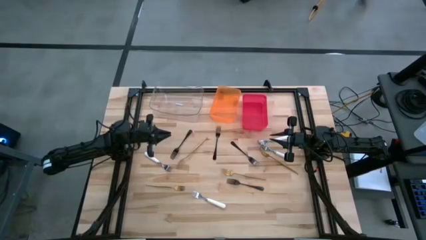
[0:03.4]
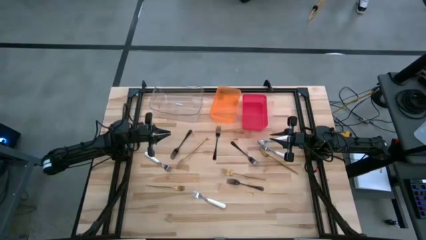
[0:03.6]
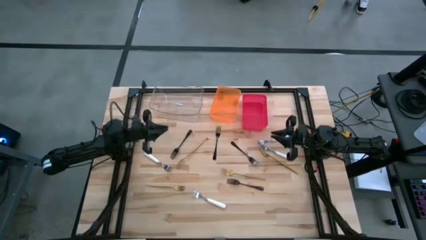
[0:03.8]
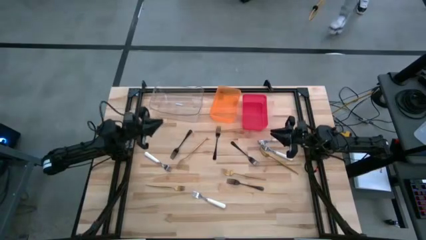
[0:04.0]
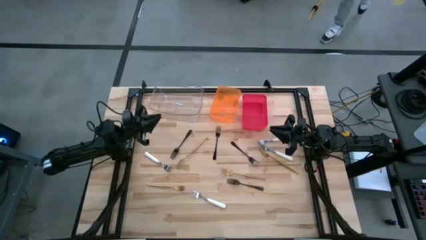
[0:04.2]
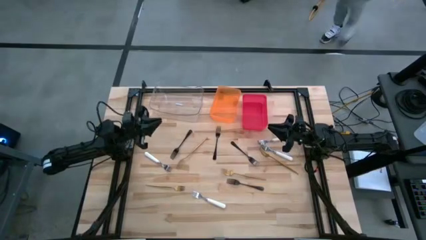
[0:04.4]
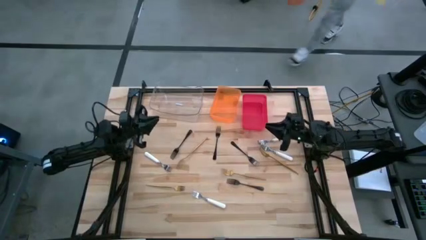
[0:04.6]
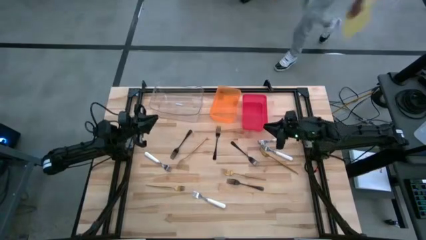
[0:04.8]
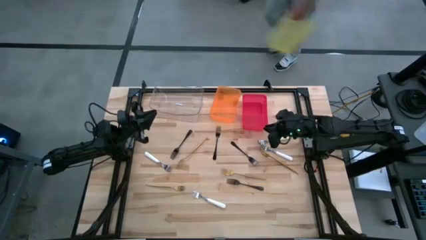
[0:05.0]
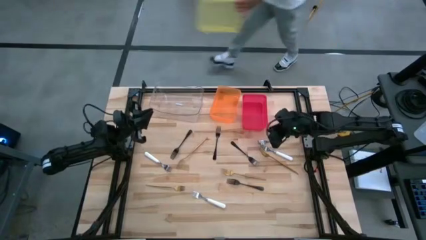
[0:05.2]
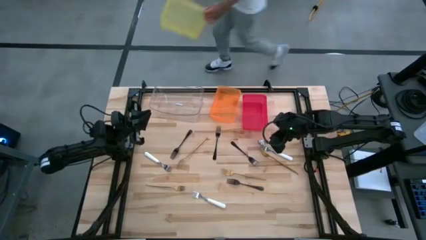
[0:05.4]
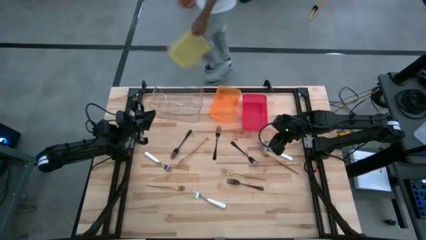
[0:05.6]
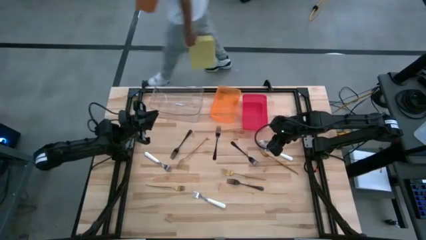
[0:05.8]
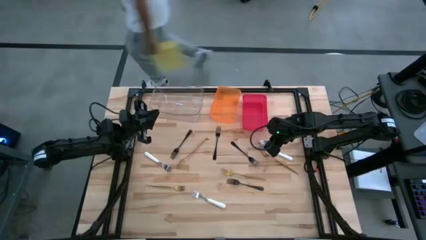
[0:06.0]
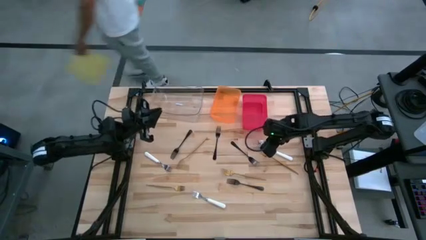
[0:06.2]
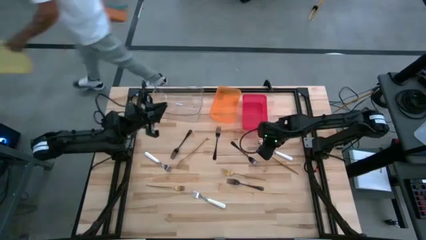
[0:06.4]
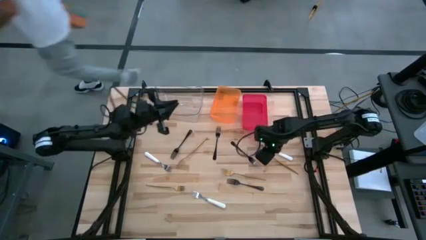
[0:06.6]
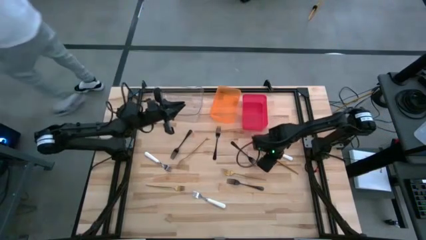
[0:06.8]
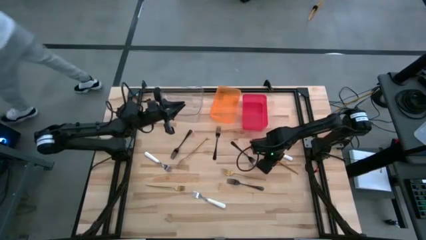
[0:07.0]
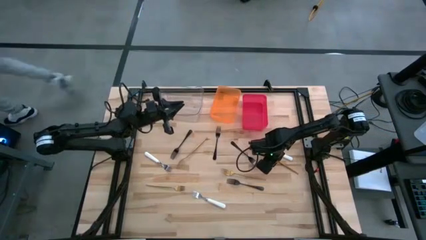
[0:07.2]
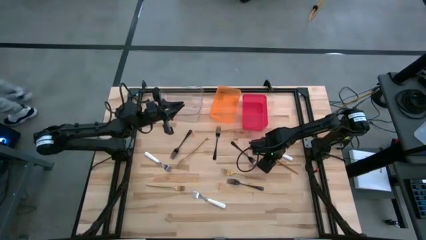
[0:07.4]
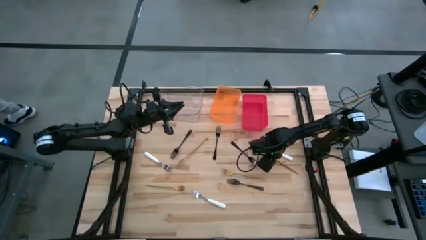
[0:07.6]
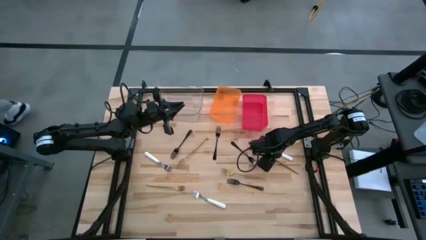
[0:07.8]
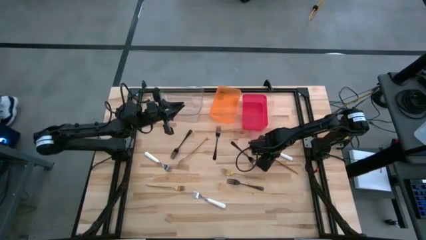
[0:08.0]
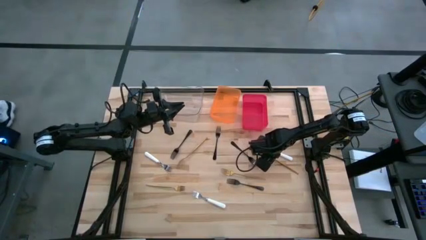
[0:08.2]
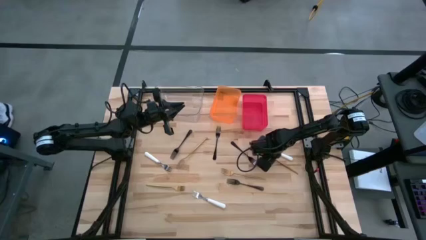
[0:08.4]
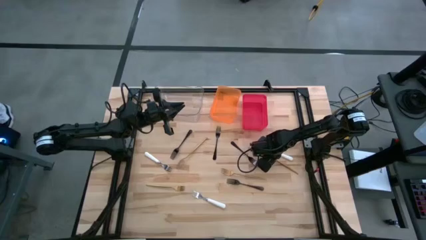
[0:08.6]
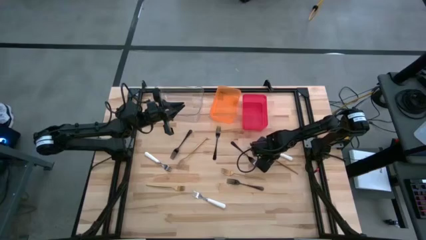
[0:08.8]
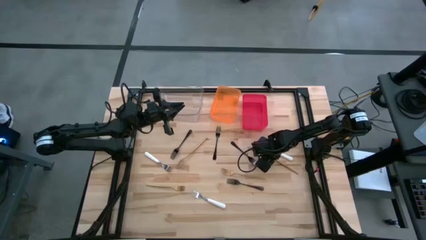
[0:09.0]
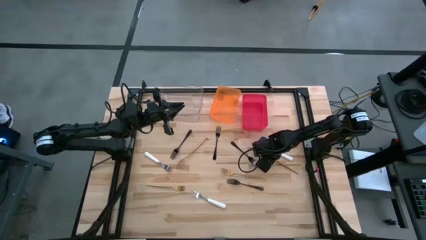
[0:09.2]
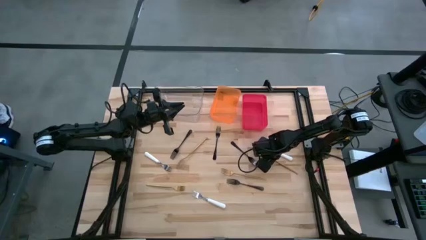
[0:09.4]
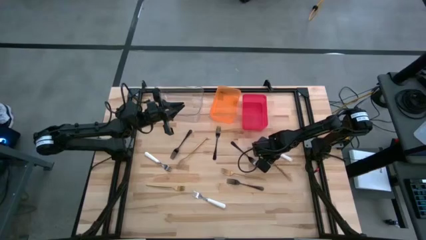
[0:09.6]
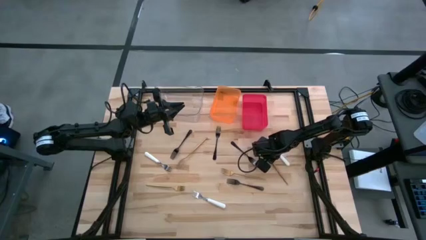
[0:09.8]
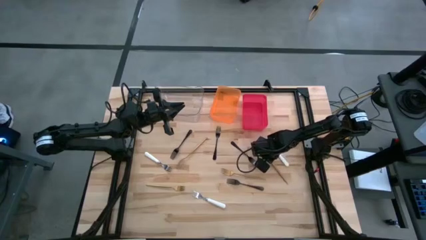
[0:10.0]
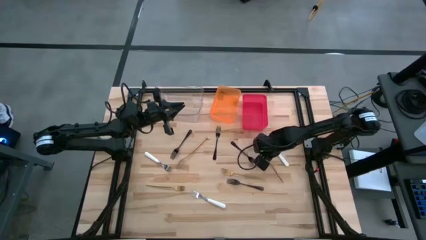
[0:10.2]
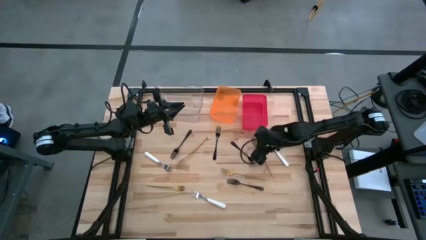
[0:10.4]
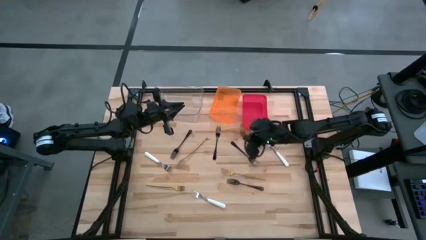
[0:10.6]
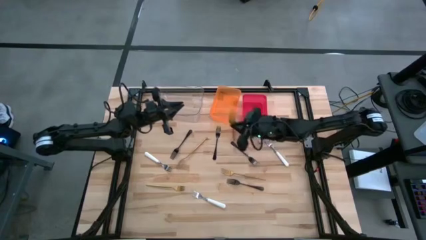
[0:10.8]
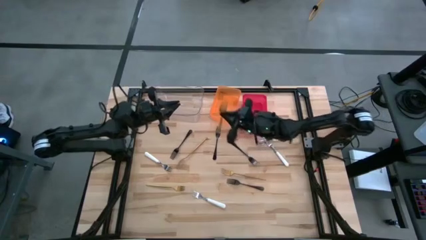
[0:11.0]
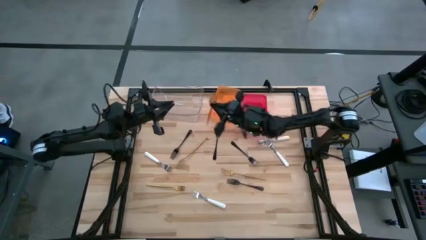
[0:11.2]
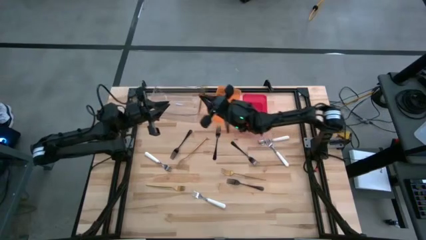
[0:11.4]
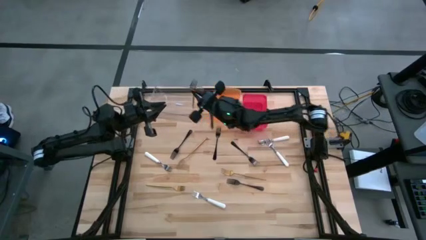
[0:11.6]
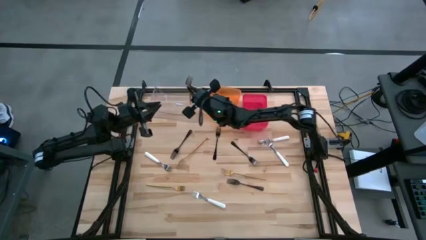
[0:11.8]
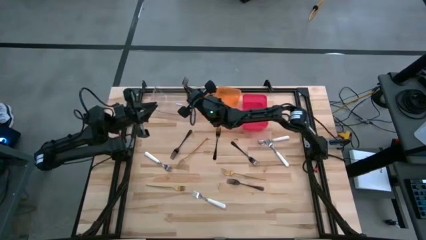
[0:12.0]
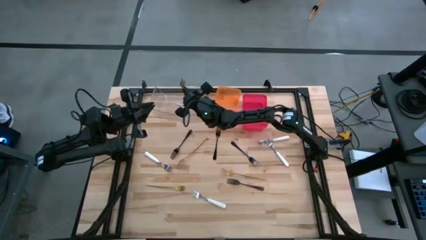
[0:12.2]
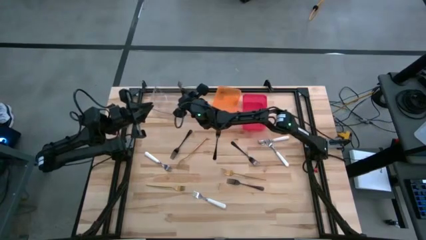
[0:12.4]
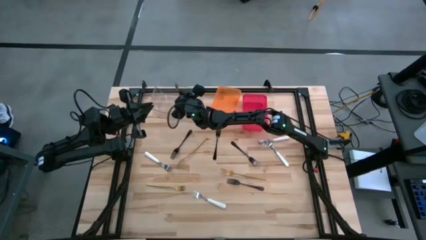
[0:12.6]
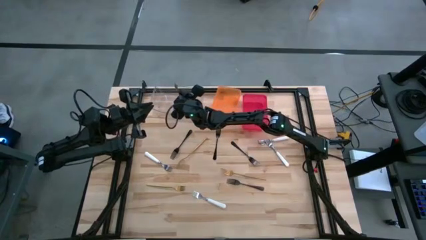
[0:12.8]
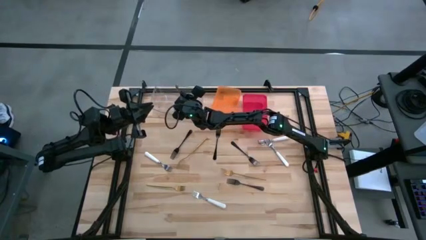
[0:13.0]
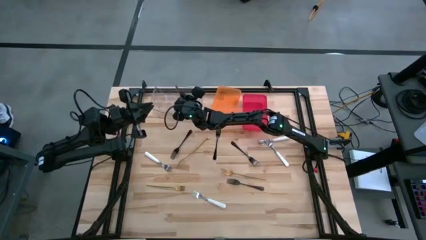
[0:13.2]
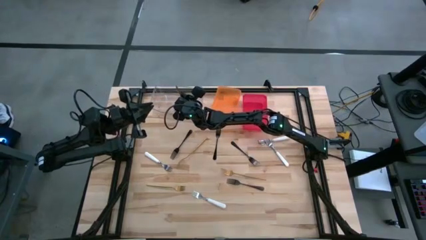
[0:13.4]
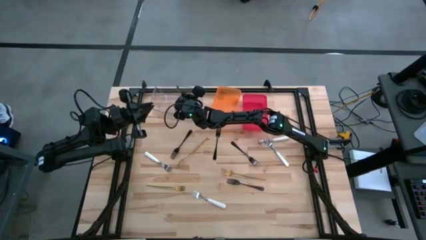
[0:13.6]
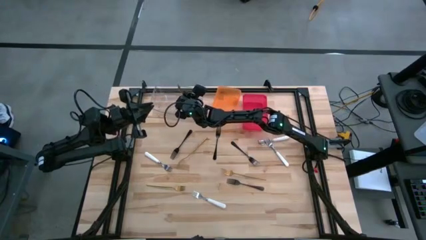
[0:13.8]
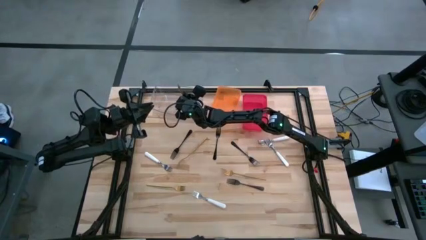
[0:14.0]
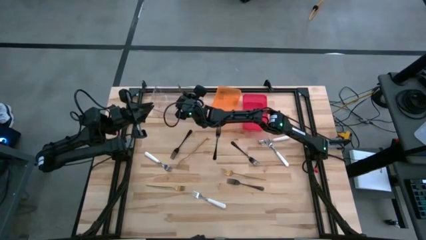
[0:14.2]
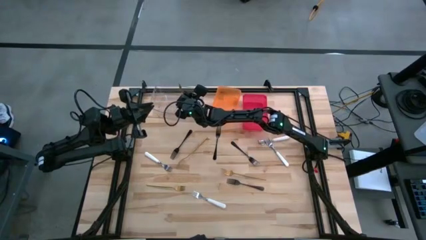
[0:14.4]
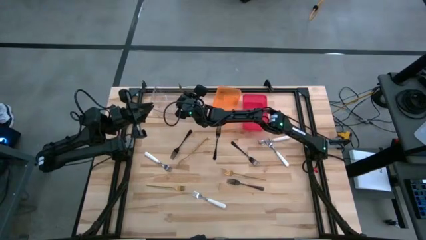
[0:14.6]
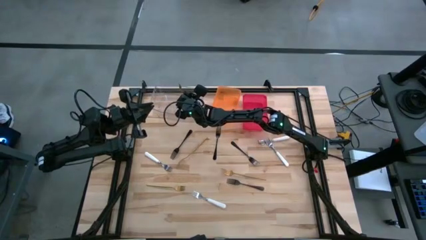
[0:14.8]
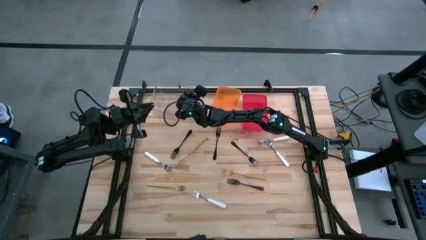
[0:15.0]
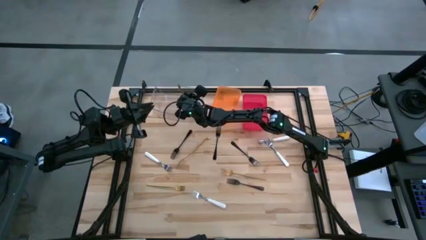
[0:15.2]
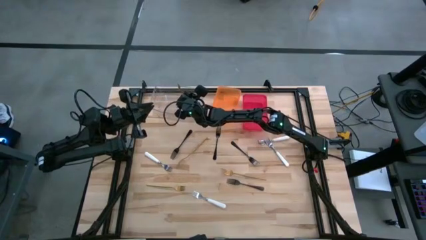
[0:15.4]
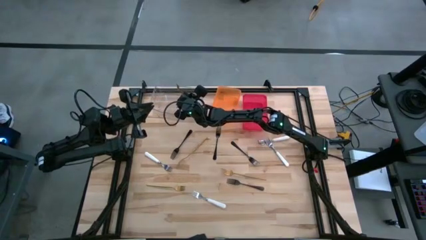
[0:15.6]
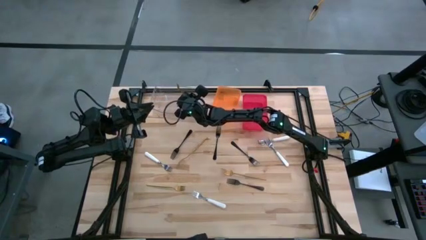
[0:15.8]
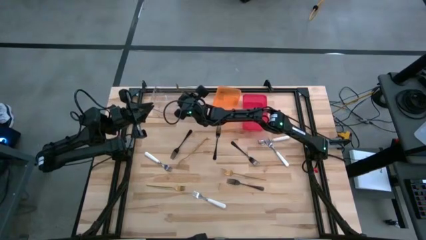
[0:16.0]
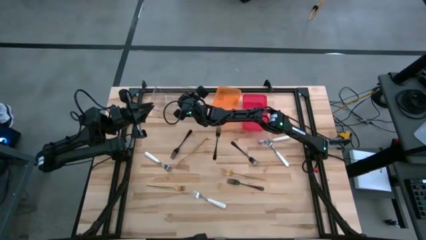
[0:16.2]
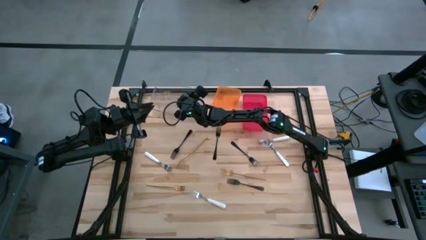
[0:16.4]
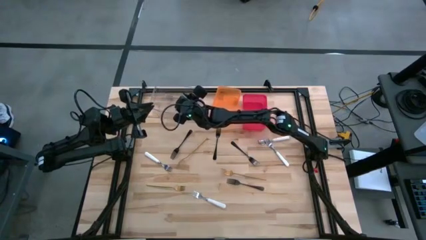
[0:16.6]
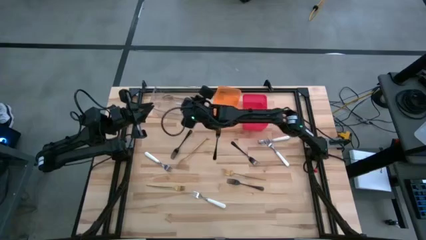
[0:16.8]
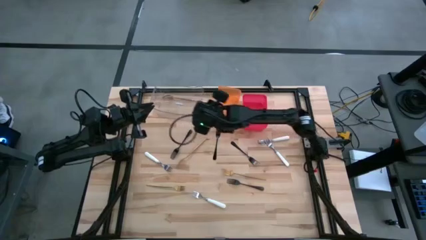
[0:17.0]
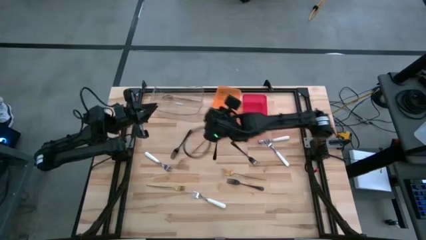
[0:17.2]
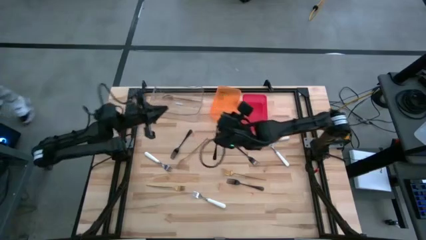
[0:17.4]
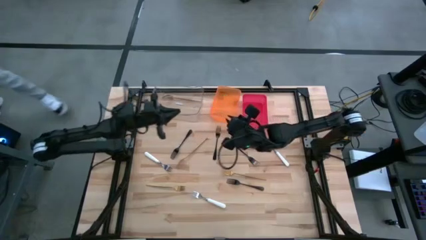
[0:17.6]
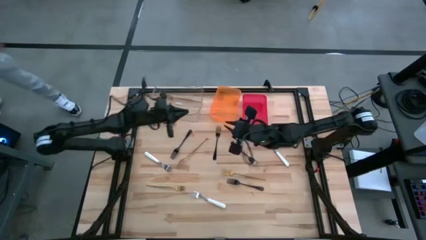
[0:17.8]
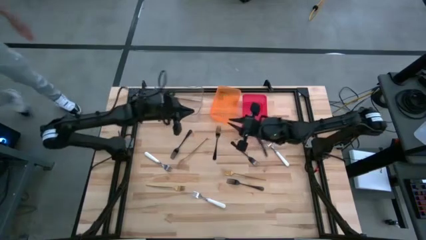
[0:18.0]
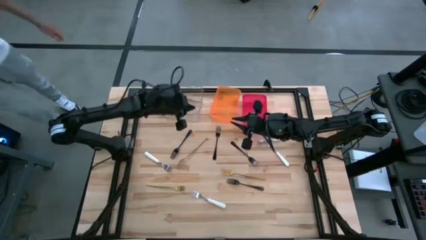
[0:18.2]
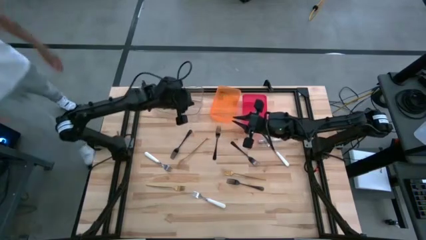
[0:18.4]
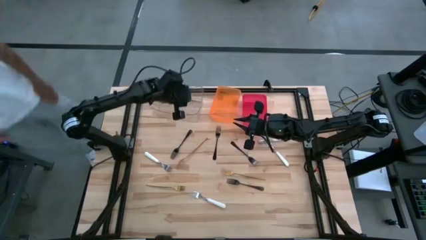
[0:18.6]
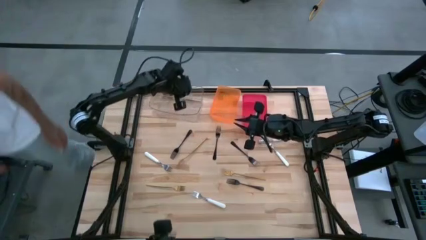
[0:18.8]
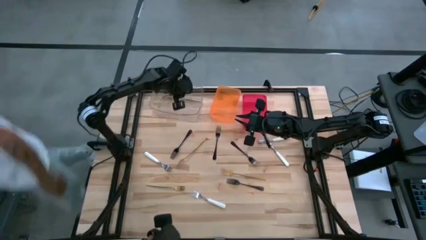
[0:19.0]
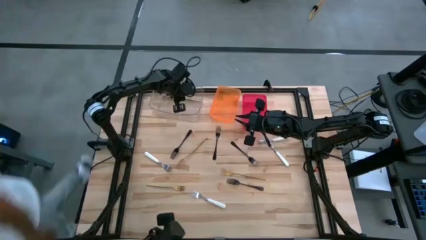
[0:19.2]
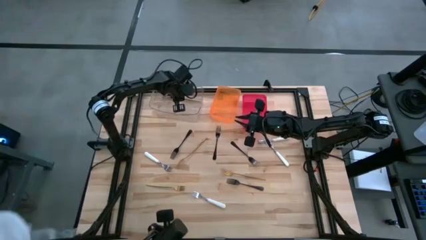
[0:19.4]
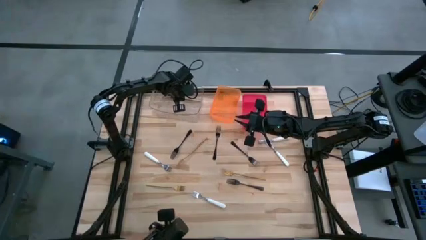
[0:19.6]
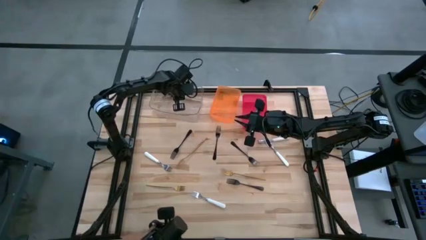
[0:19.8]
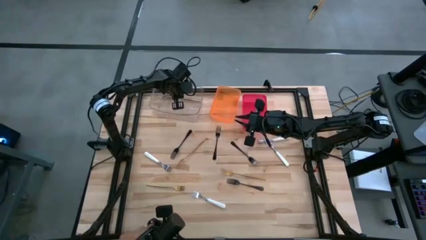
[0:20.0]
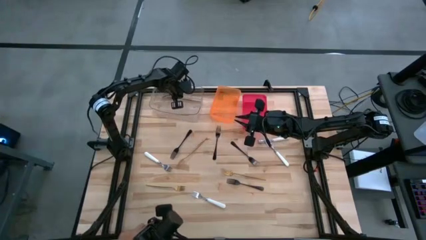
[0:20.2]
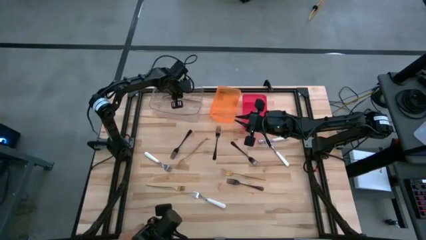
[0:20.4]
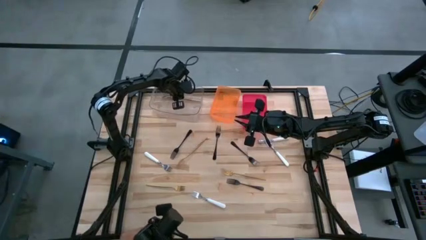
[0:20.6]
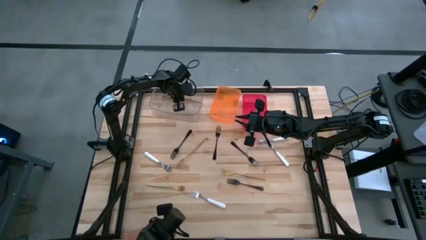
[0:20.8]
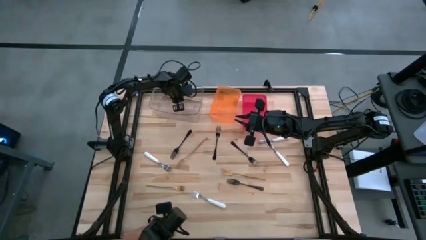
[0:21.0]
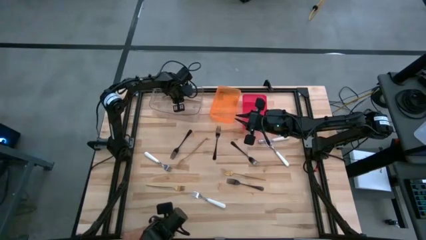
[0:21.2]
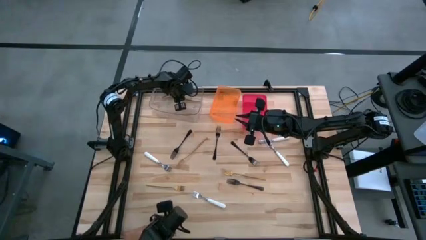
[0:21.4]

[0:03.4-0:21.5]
Task: Sort silverware by color (type)
Put the gold fork into the transparent bin
